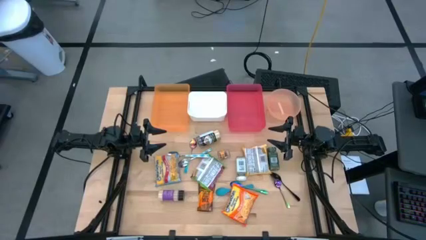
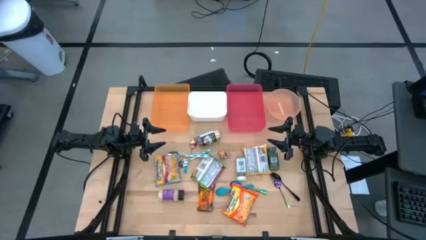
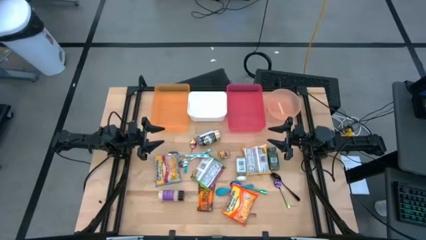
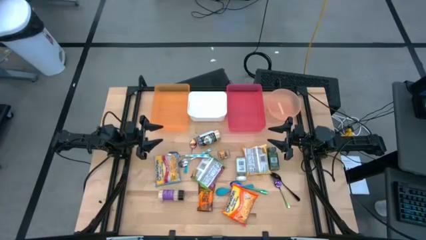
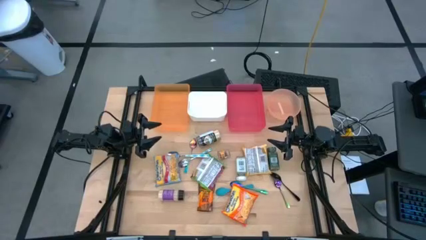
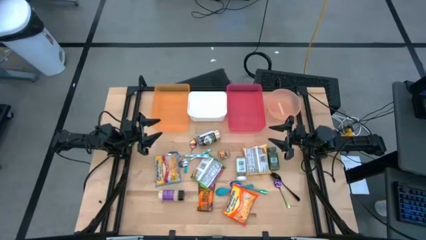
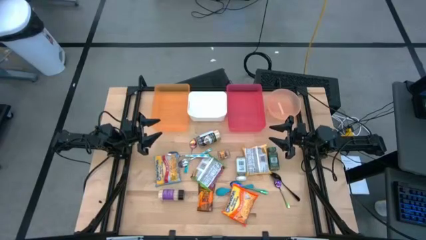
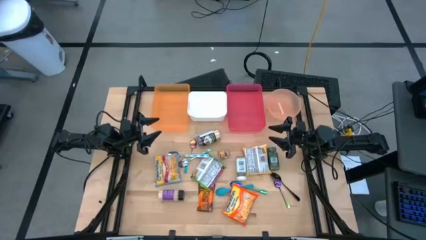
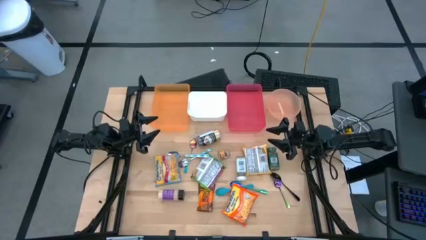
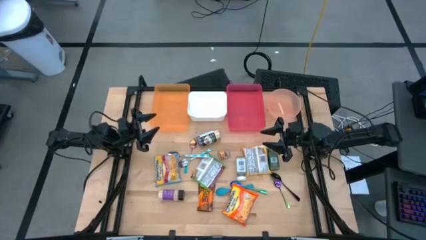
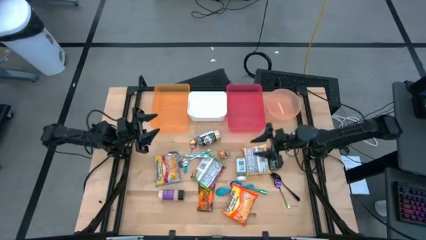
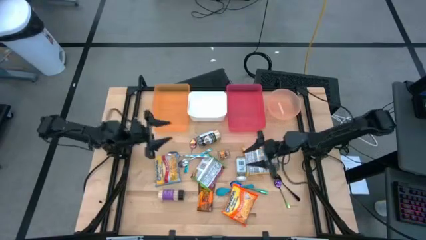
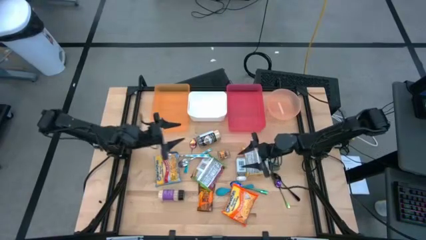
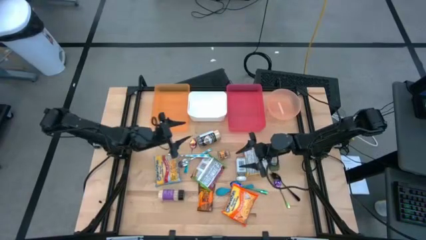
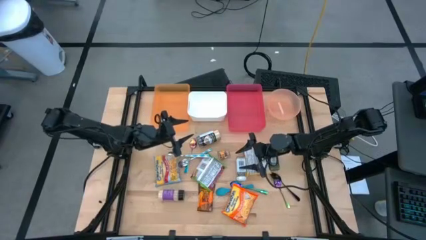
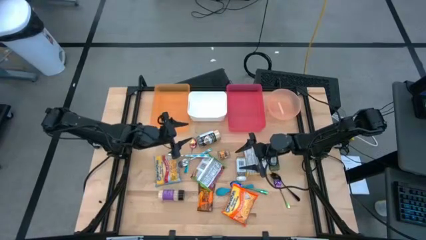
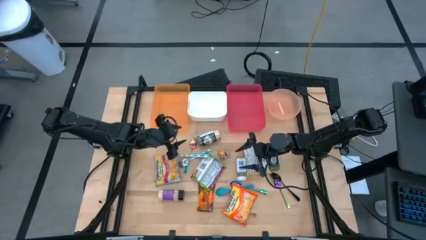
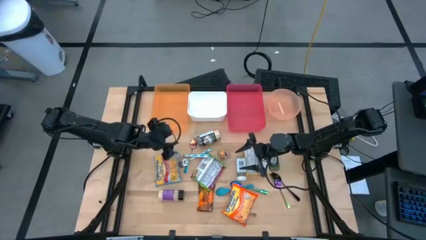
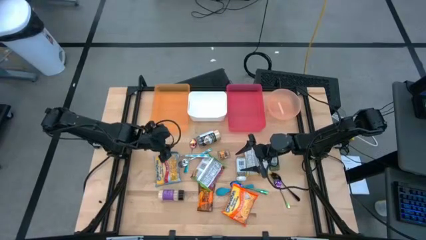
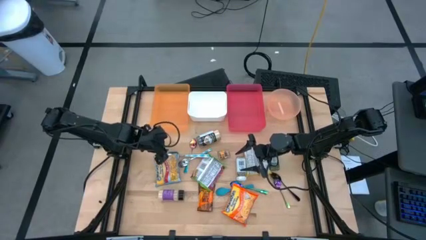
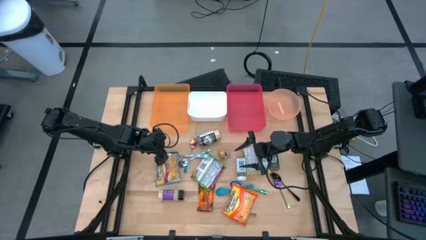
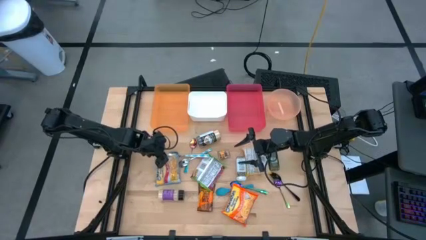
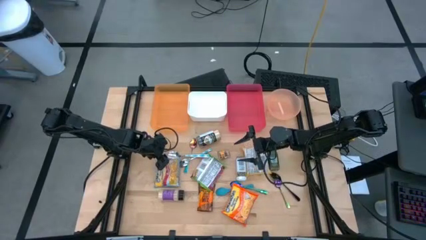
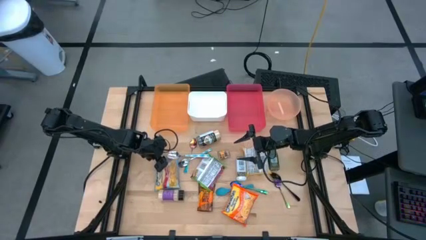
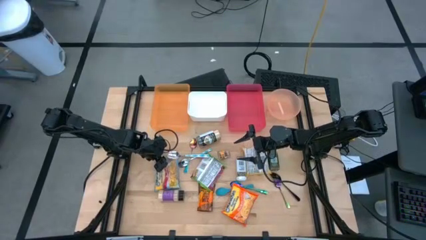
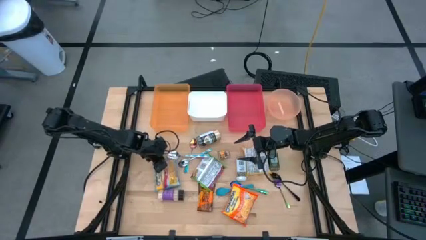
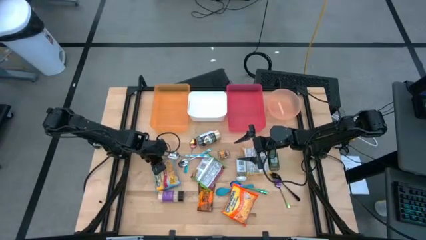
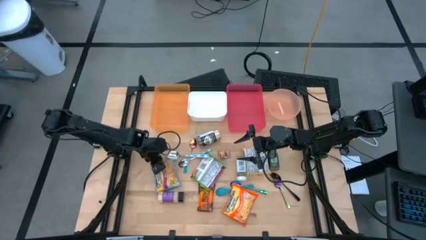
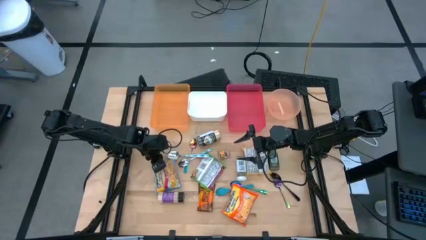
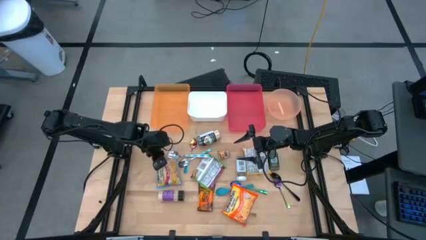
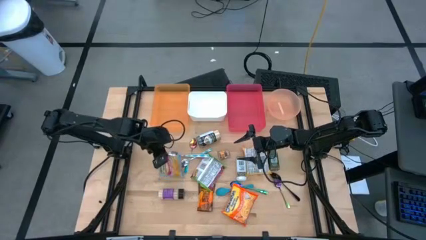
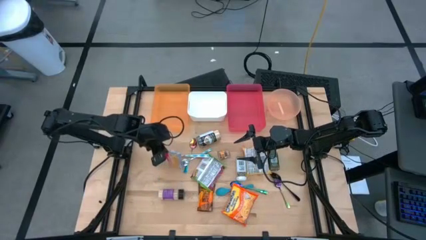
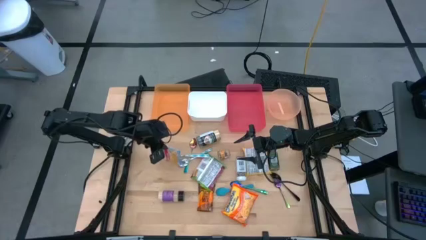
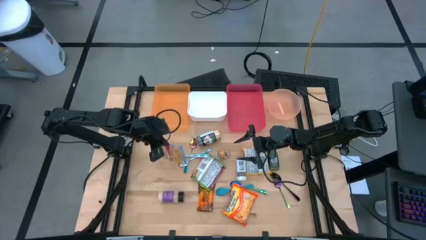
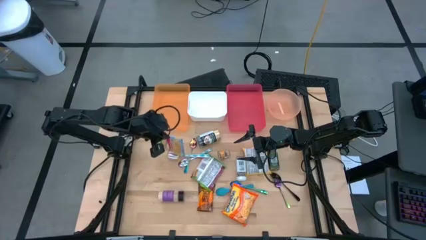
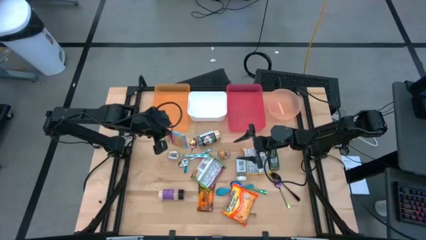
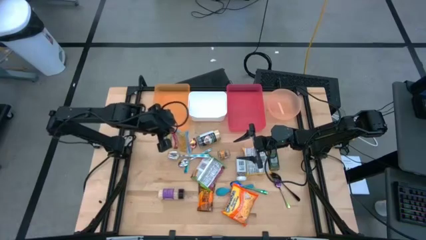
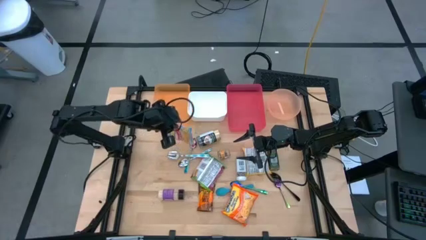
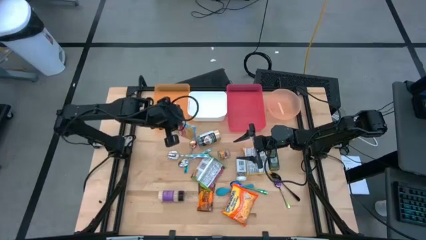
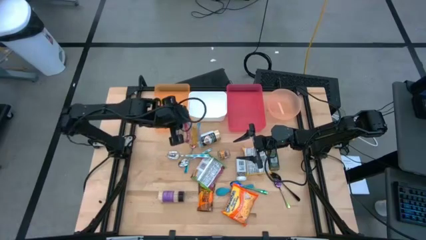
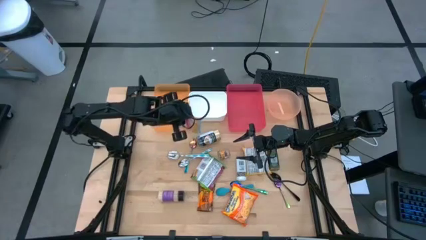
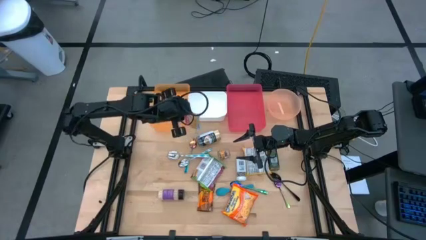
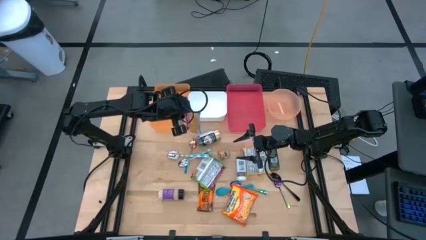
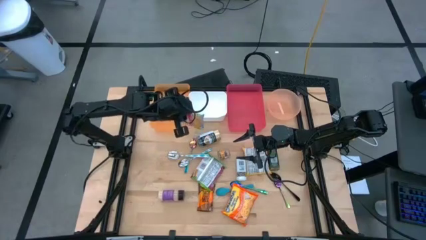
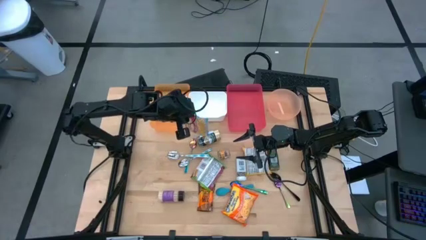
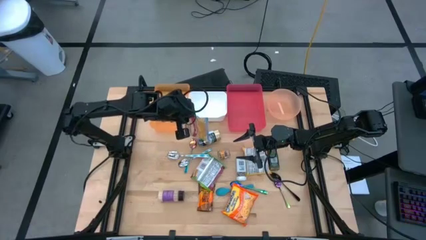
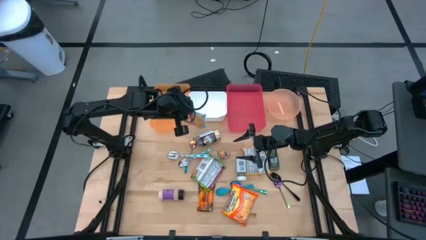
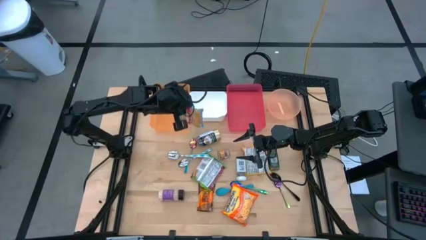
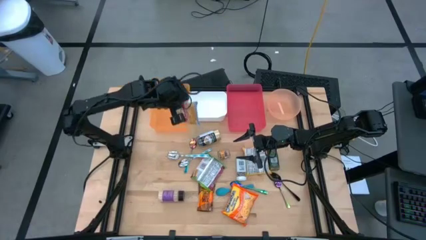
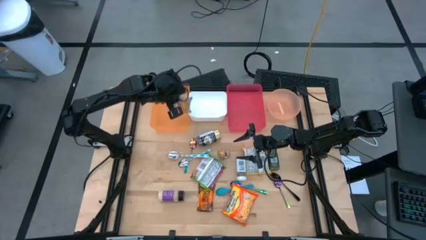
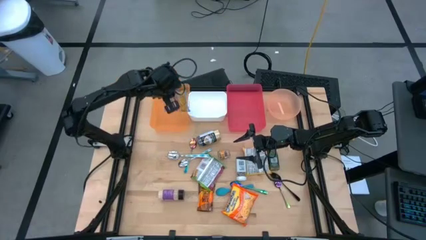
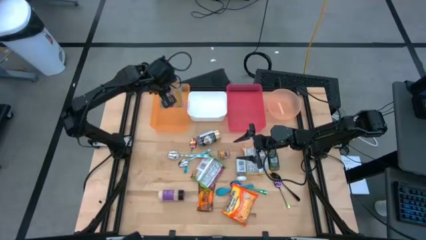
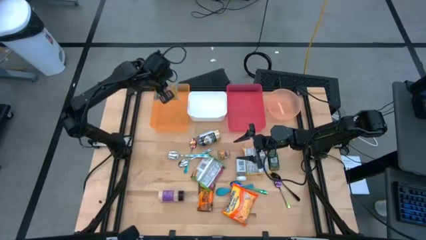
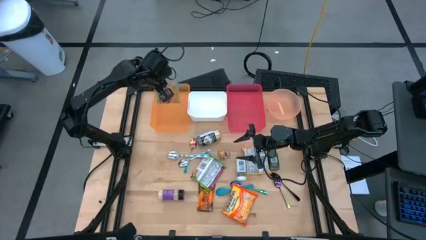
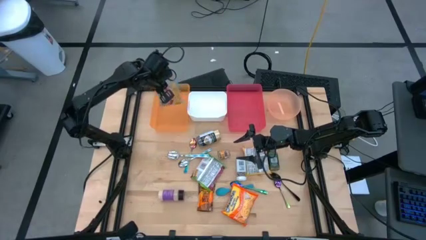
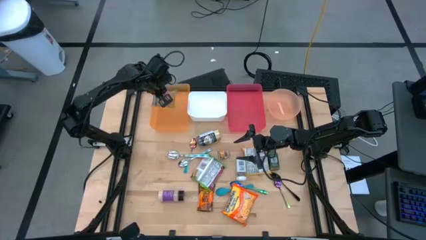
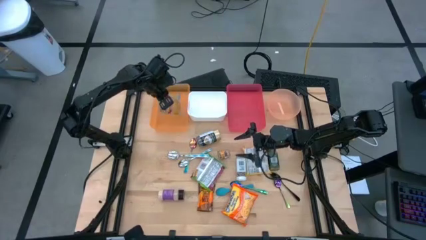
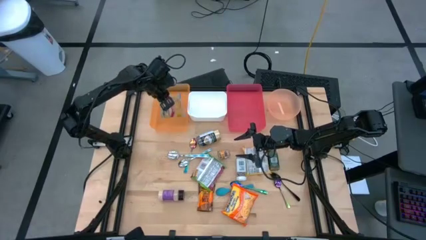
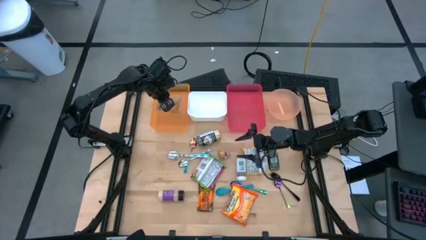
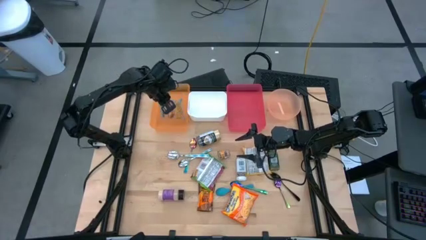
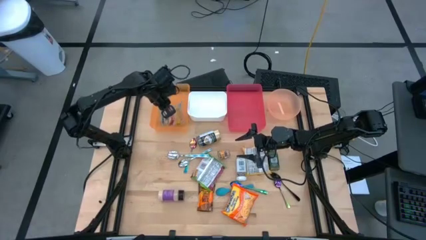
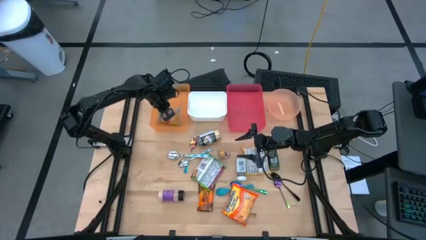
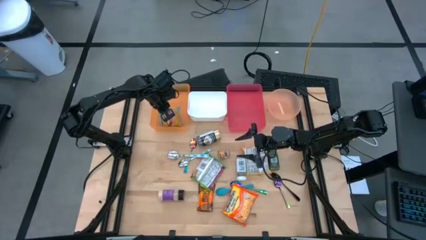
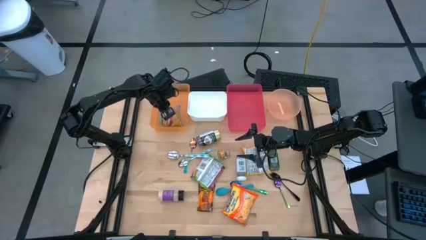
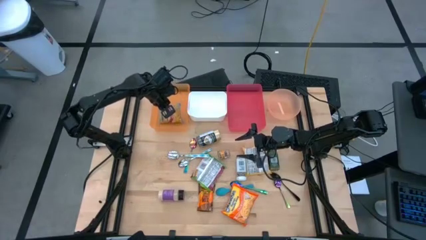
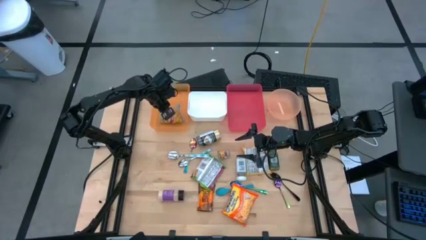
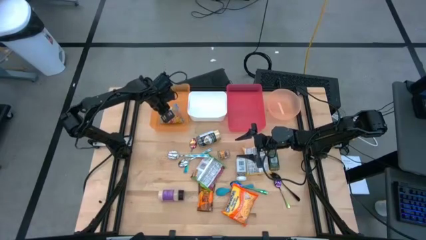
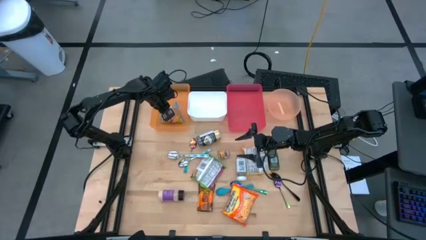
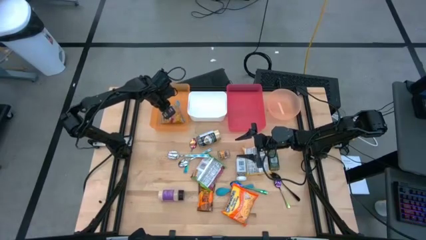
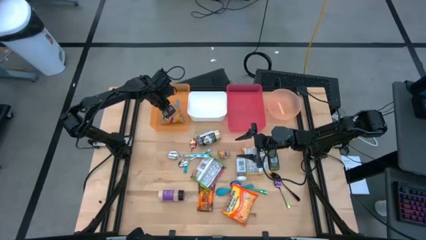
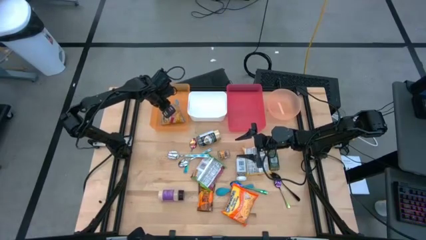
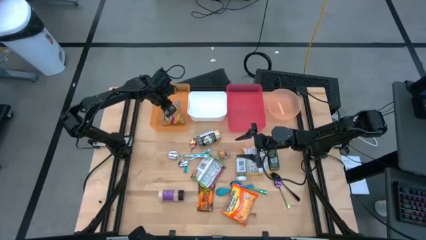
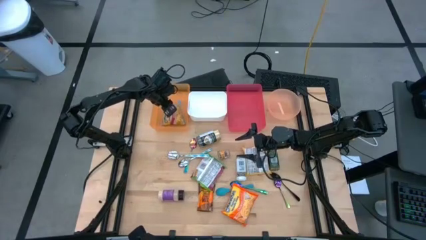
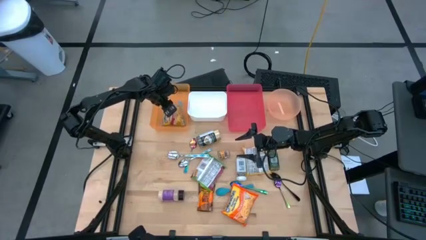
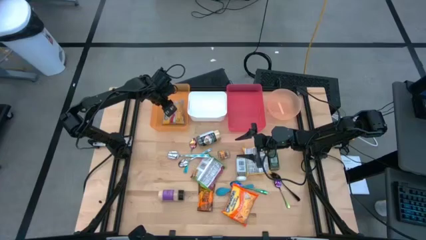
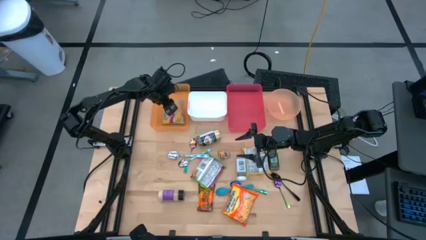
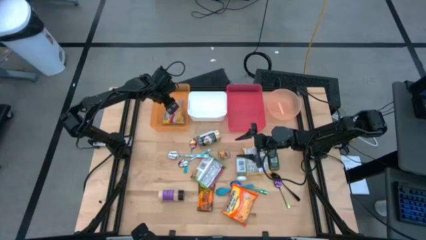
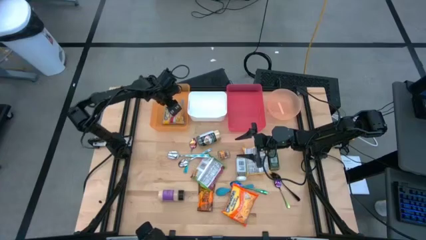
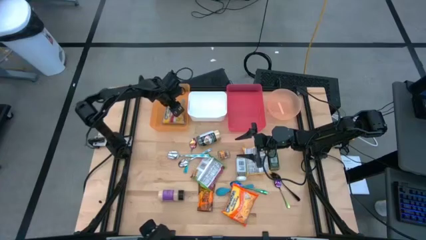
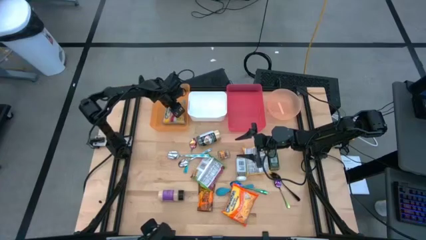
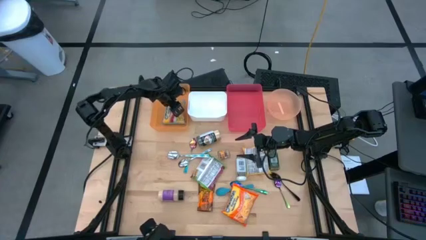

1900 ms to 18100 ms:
Task: Pick & Place Food Item
Put the blue noodle pack into the orange bin
